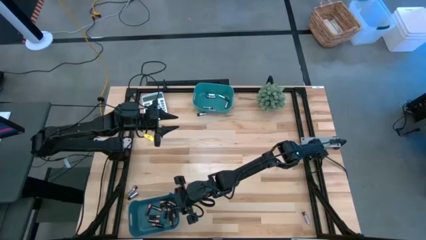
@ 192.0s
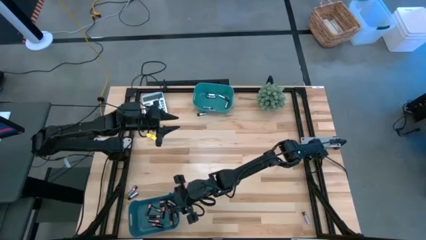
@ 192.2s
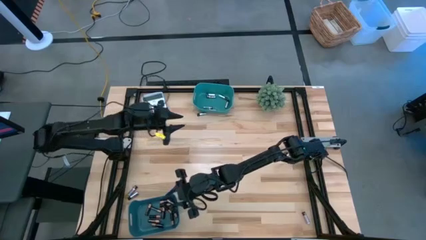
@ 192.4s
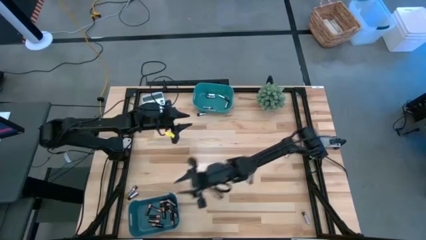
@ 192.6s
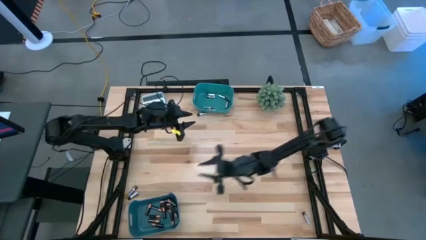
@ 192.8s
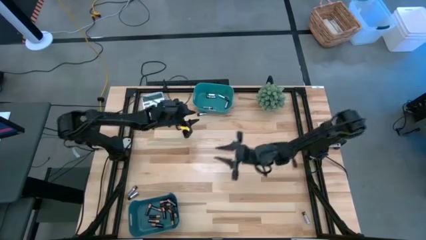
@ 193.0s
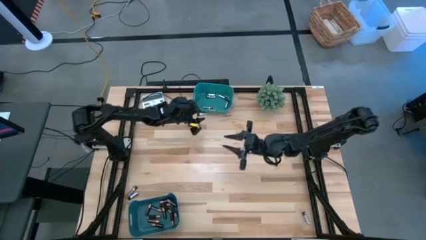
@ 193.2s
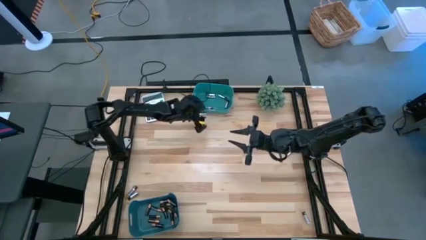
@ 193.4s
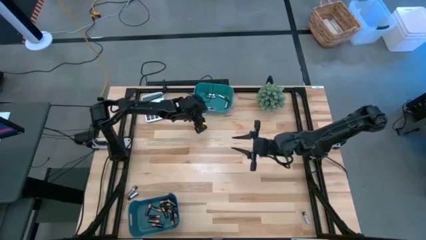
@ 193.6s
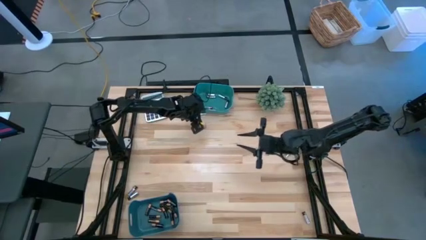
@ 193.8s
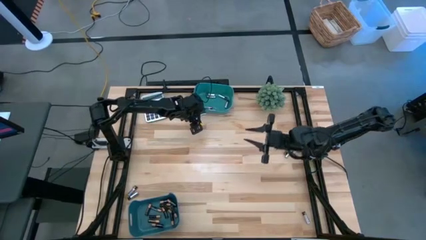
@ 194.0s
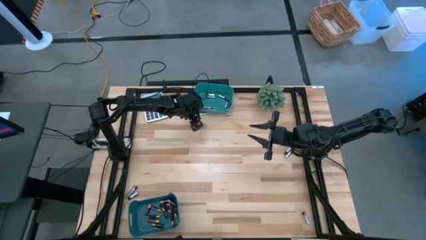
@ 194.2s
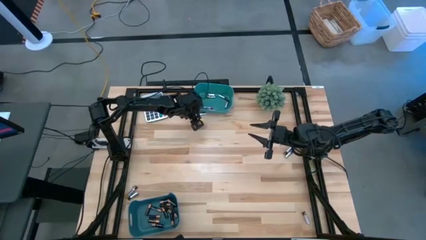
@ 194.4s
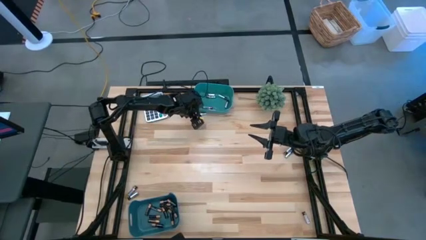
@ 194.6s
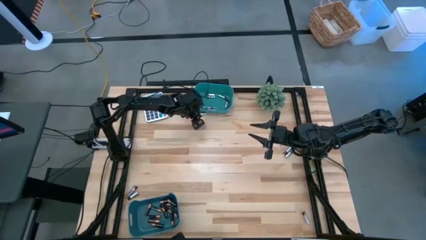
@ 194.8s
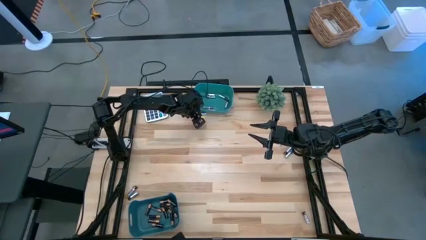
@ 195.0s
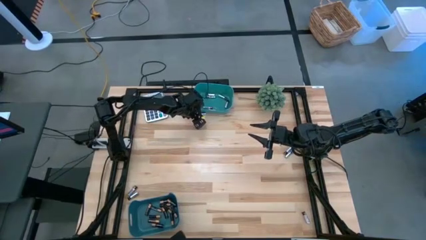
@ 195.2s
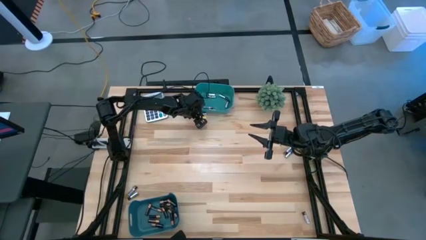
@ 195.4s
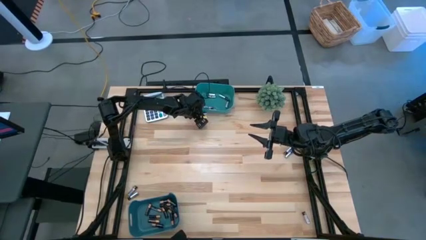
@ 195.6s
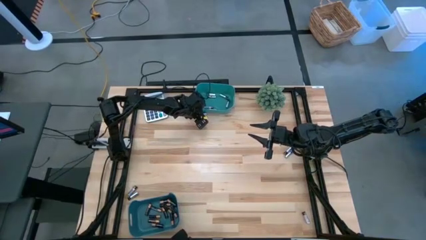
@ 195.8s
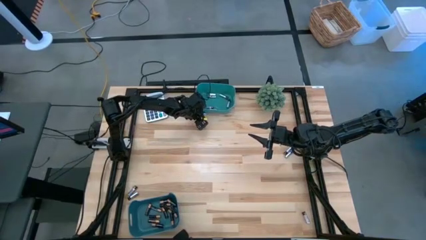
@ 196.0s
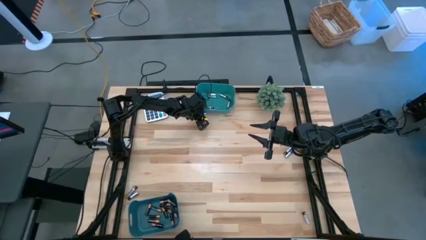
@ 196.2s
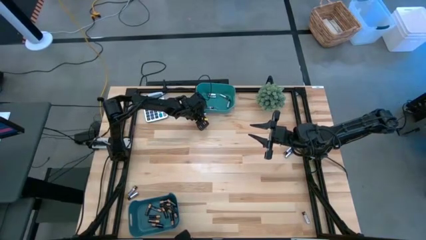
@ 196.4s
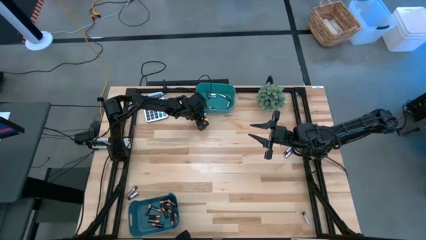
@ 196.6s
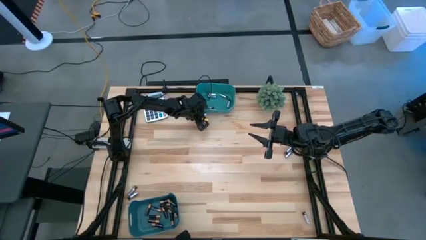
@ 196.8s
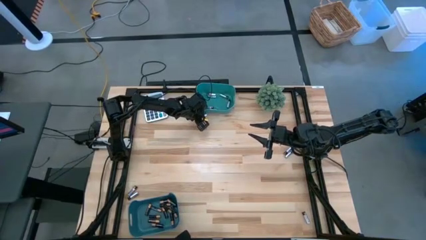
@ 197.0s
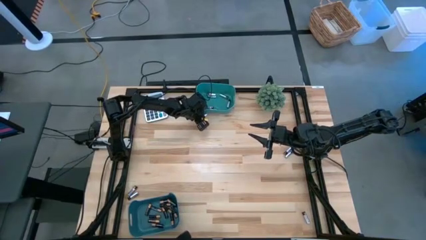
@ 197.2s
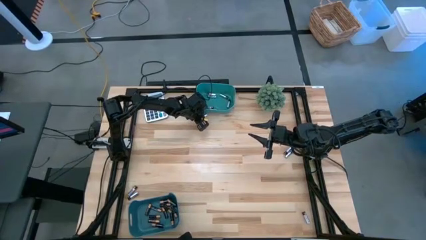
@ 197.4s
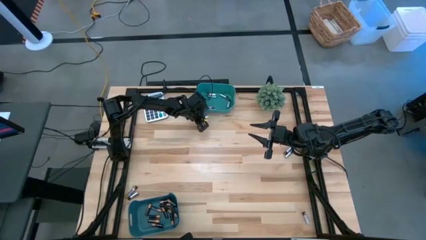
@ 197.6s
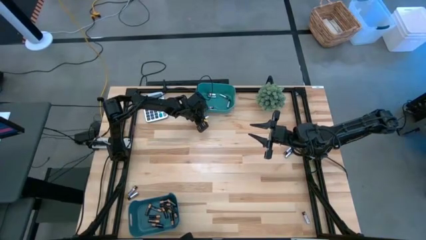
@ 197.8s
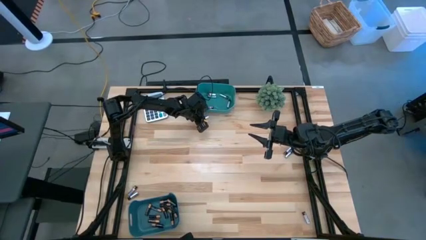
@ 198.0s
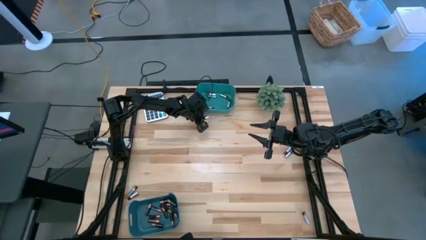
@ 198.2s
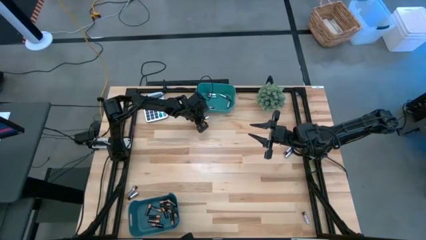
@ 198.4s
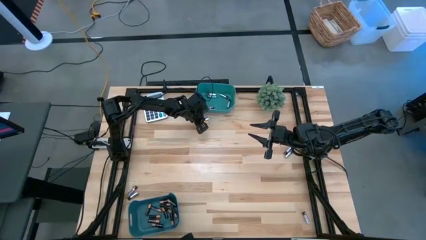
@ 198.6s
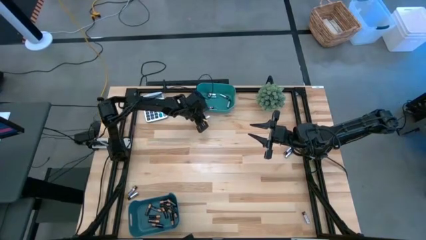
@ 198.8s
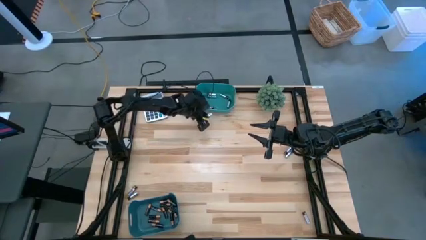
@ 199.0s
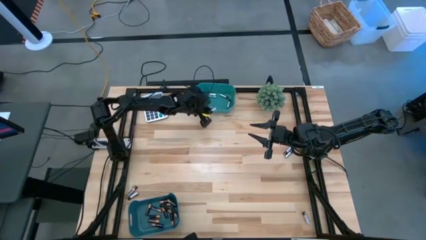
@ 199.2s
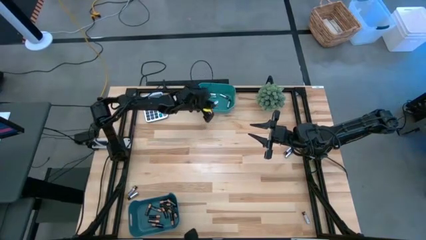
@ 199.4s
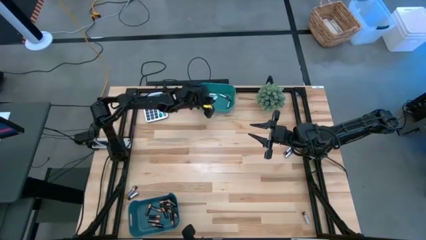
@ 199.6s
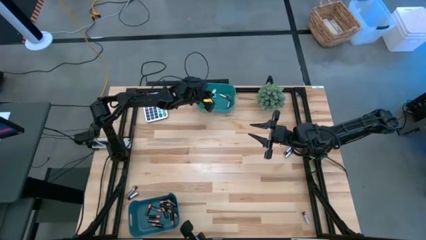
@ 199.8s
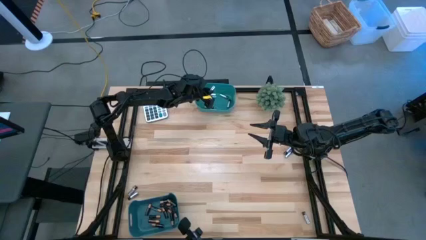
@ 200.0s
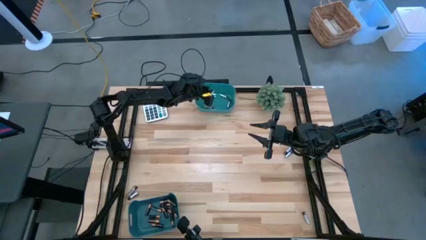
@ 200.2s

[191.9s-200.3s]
Task: Sort batteries
Put the silver battery into the top green bin

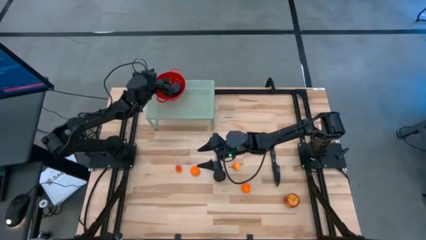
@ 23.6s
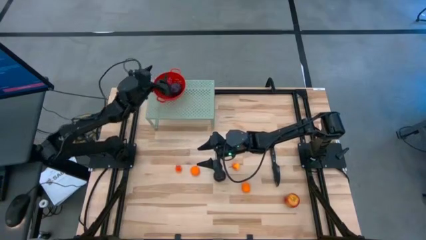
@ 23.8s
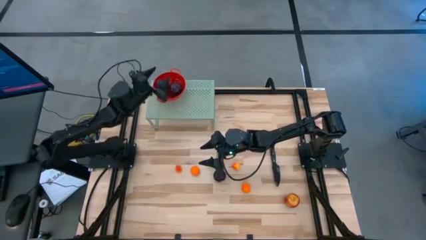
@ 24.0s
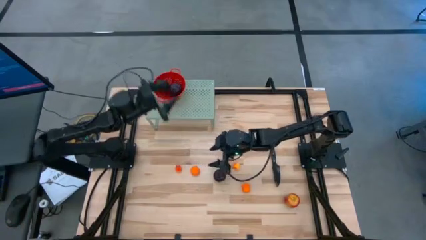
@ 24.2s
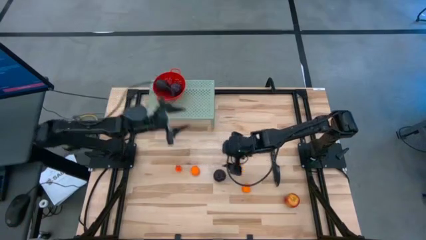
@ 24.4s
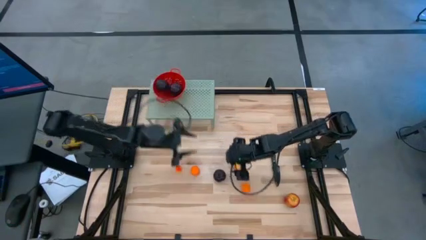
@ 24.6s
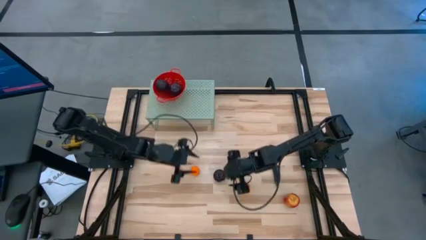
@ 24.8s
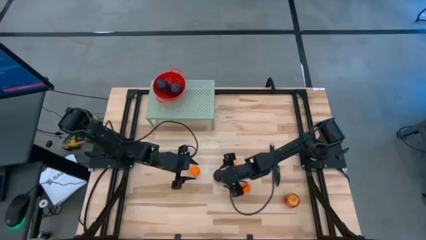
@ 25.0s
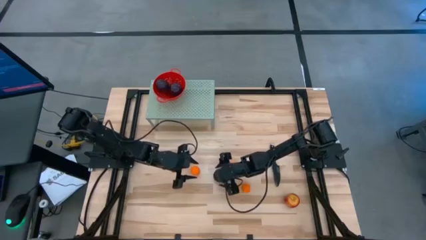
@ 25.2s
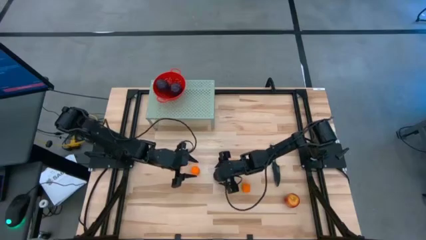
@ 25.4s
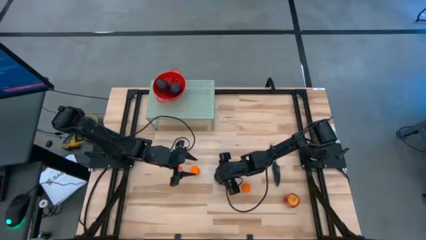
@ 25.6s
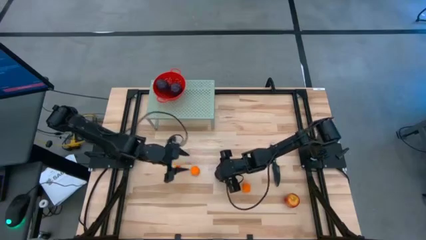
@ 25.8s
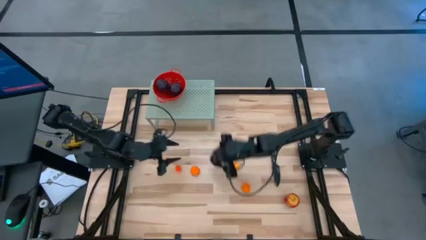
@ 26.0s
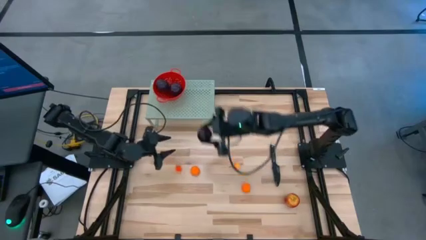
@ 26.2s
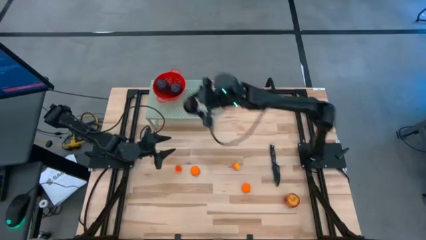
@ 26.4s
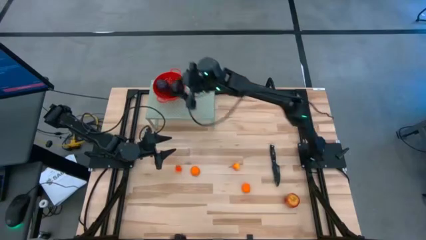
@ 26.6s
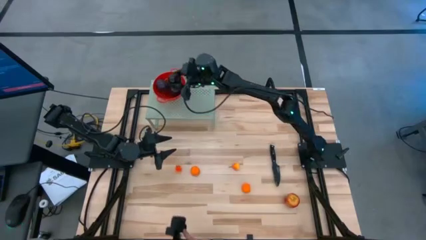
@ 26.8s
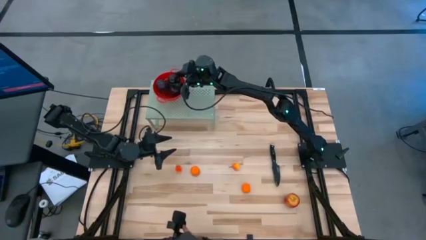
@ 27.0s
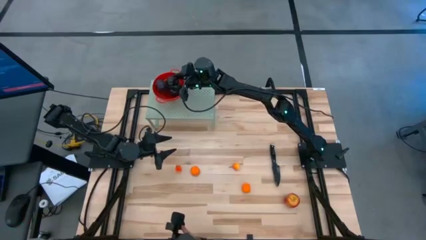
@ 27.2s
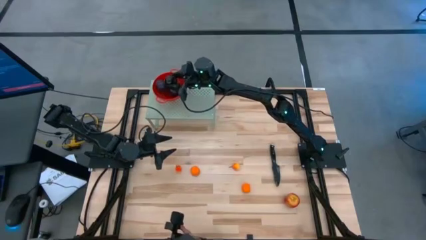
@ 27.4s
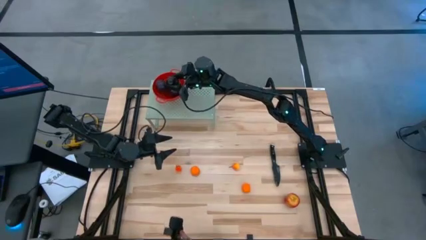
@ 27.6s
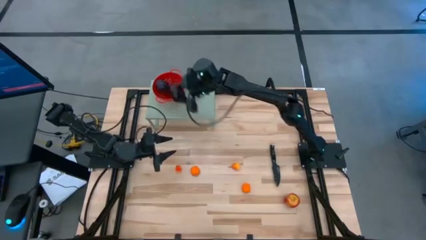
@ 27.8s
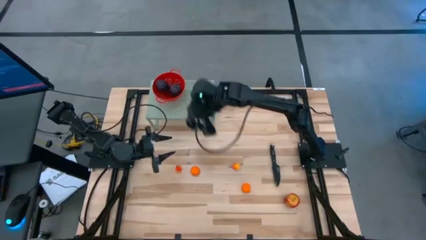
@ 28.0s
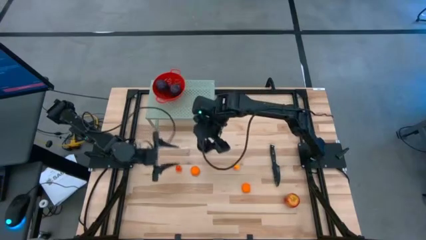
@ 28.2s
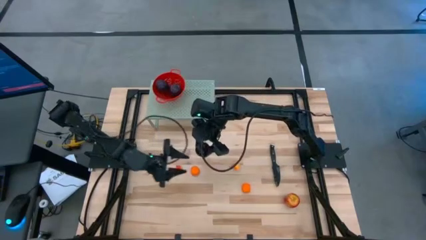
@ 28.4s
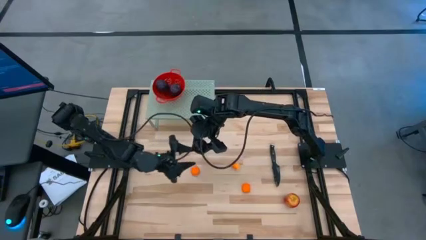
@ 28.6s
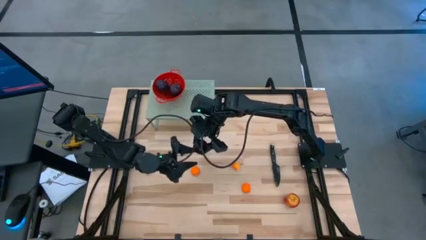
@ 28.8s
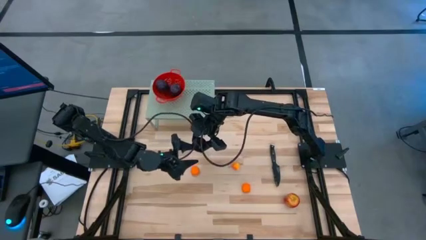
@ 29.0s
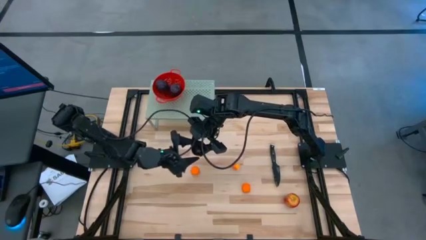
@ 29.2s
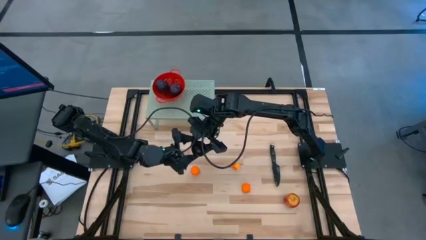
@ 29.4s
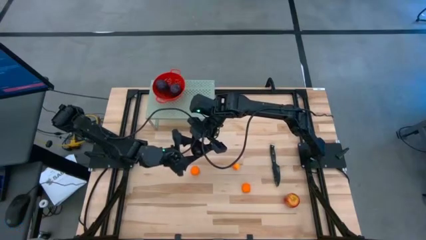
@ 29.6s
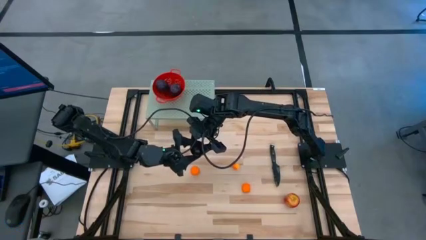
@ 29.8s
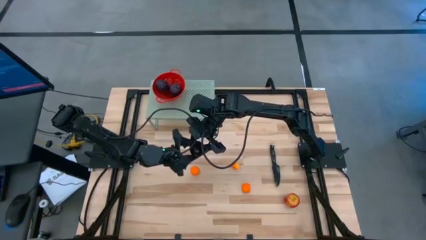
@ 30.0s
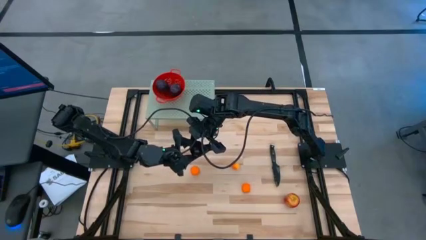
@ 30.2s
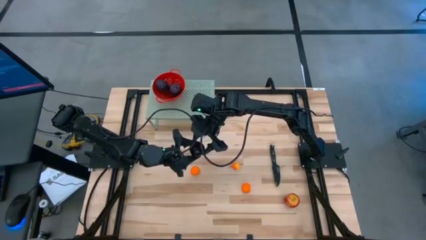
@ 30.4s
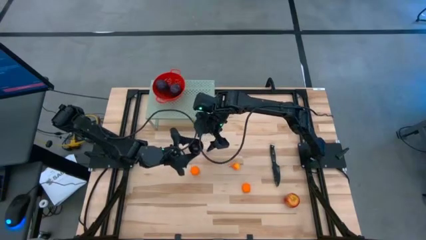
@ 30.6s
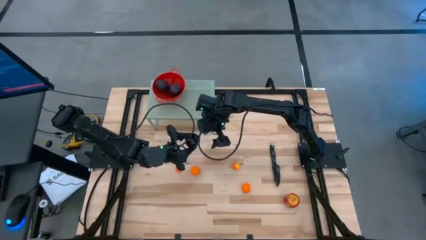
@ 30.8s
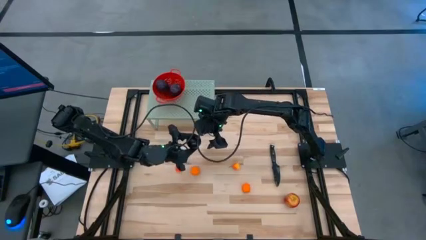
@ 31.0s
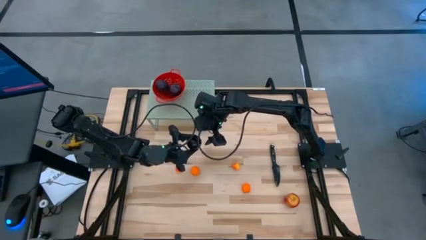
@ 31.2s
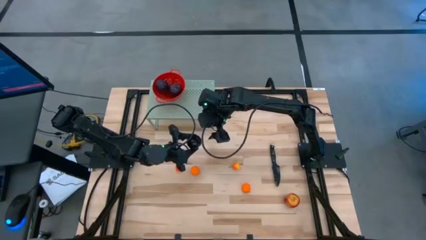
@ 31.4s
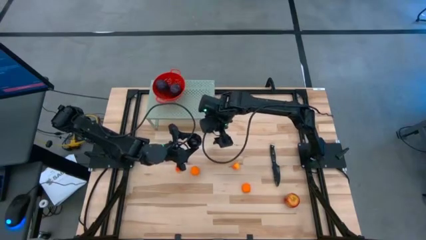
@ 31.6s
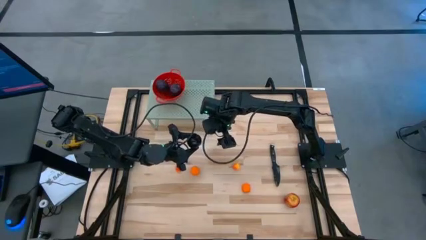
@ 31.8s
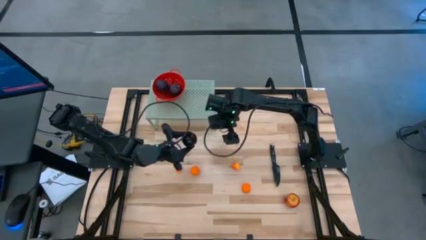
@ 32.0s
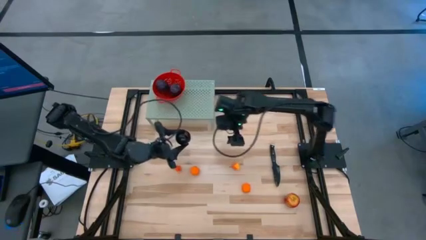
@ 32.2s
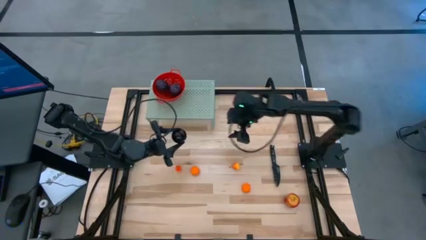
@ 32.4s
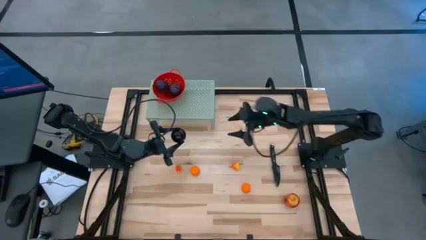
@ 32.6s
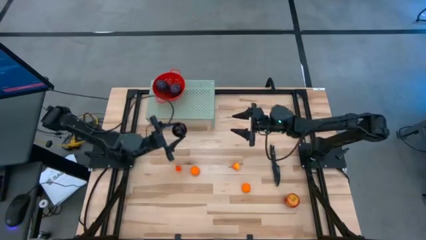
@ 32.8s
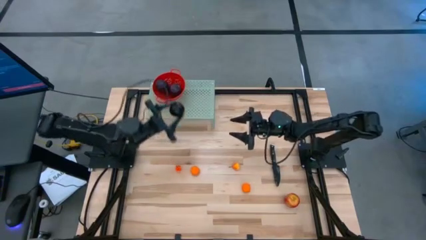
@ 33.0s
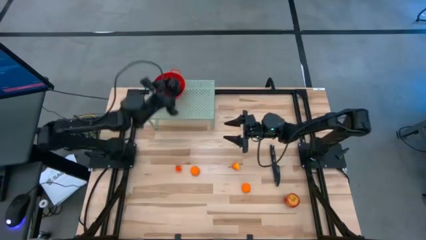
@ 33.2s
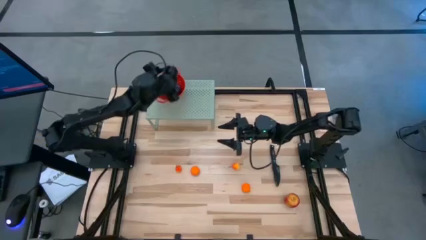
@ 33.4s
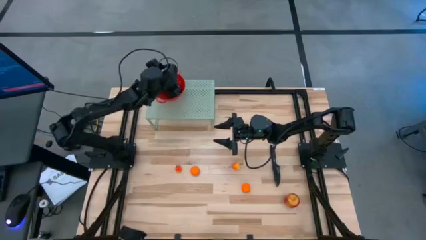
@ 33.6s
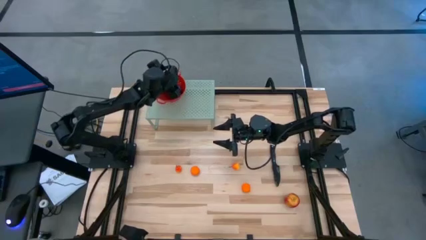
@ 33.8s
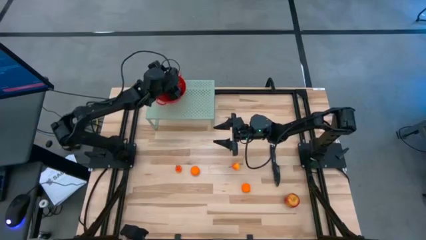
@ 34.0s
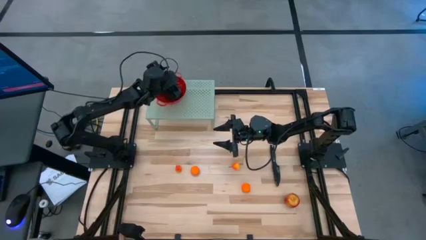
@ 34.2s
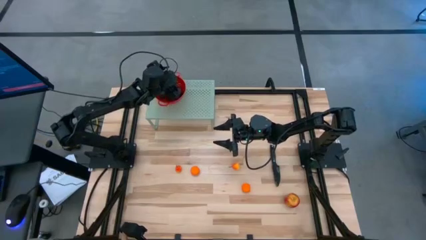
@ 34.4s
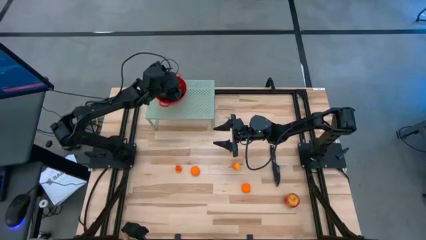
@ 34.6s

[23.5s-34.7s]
Task: Pick & Place Fruit
Put the purple plum into the red strainer bowl
